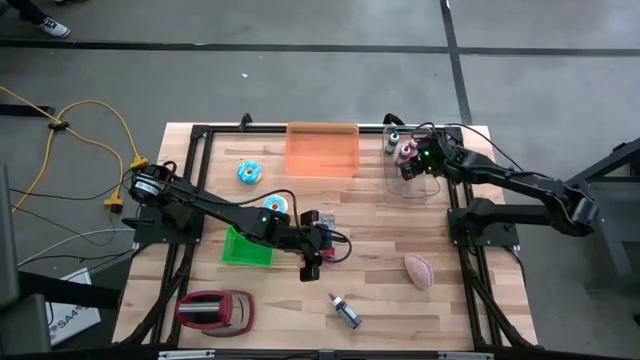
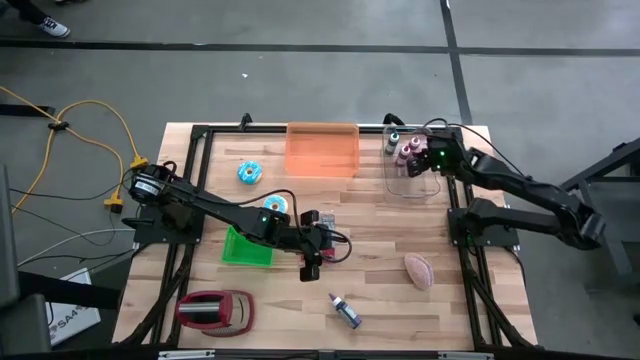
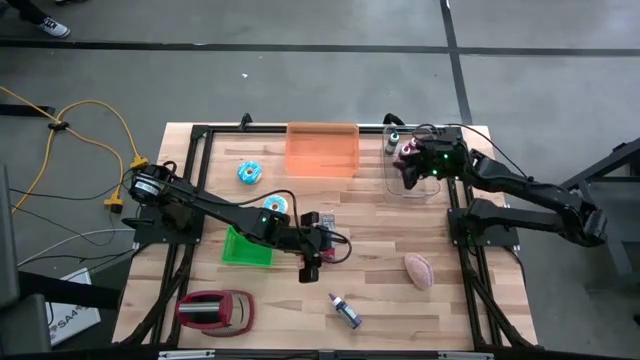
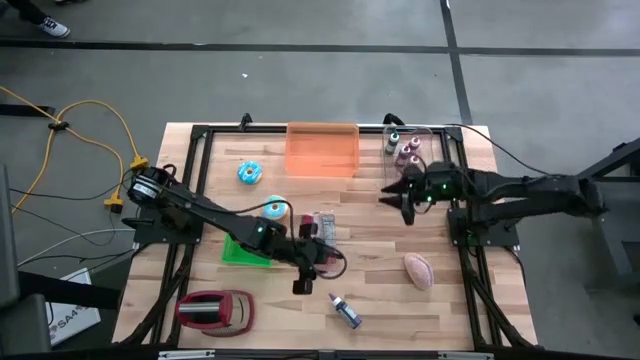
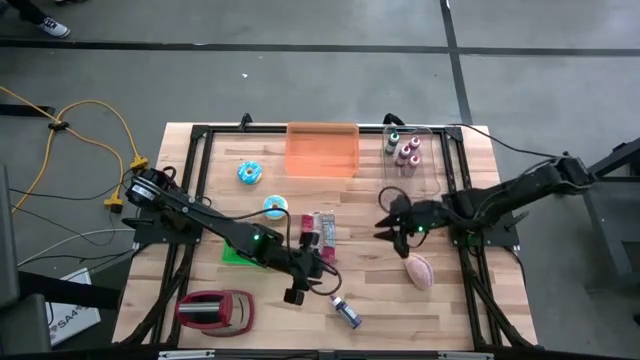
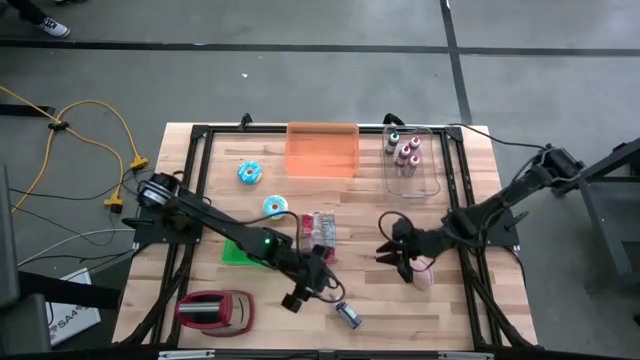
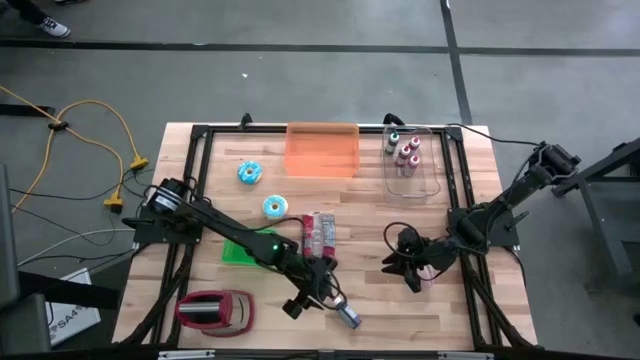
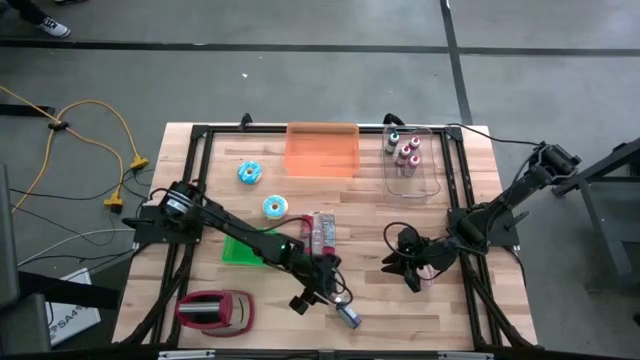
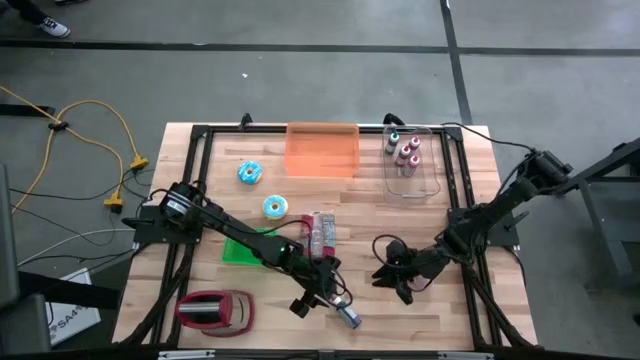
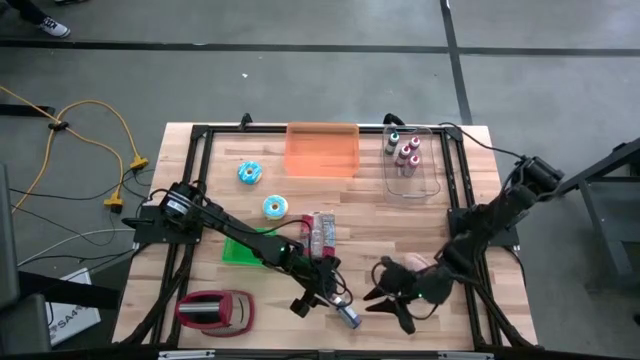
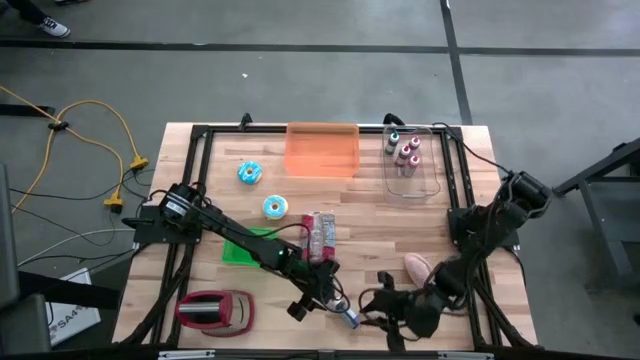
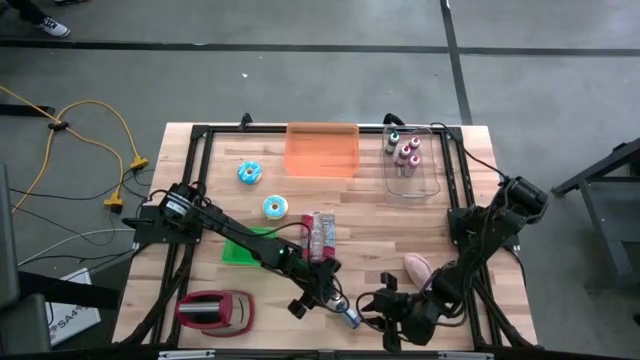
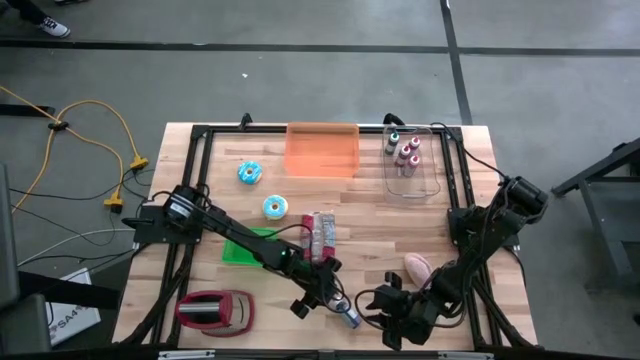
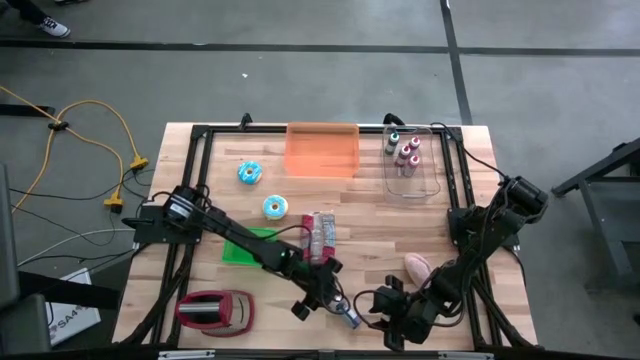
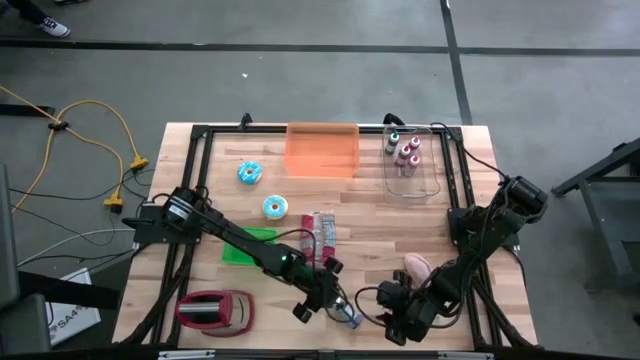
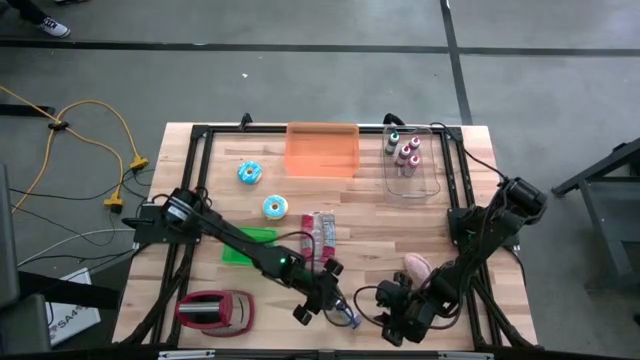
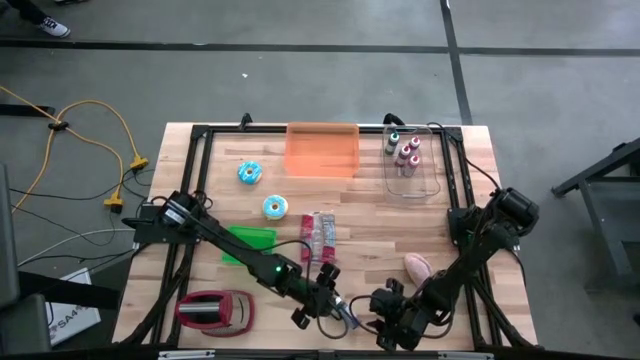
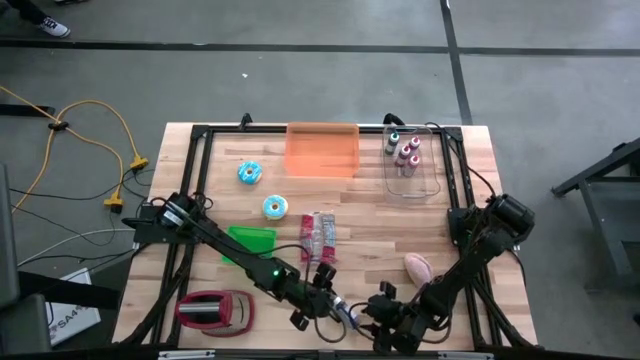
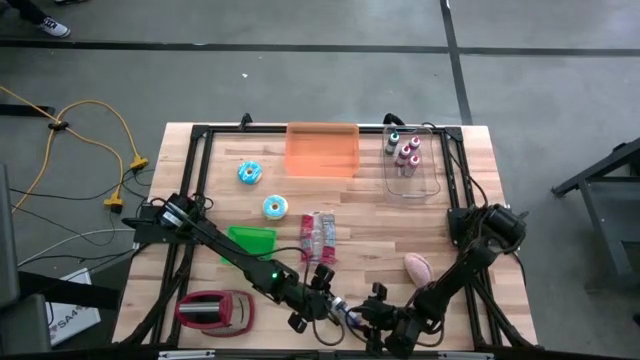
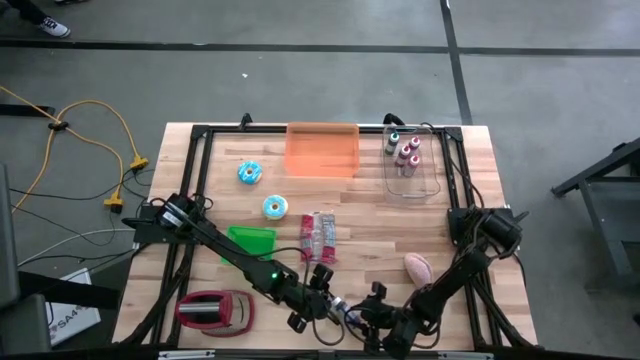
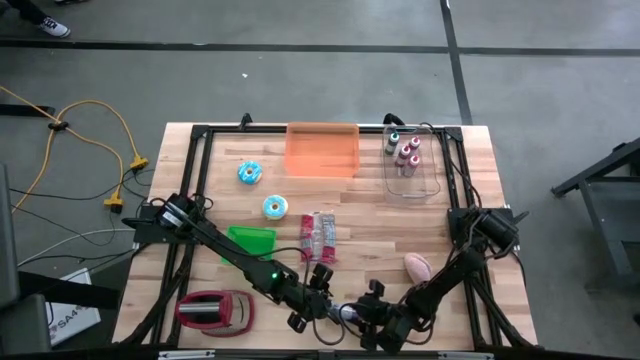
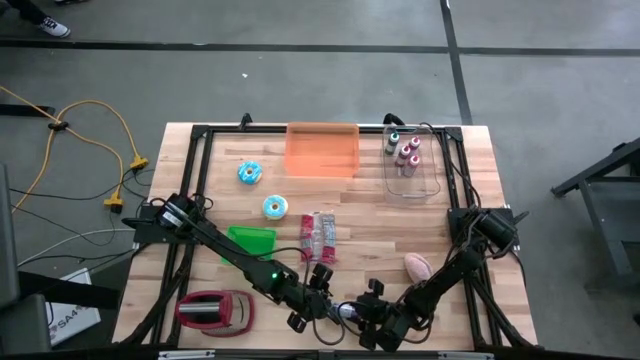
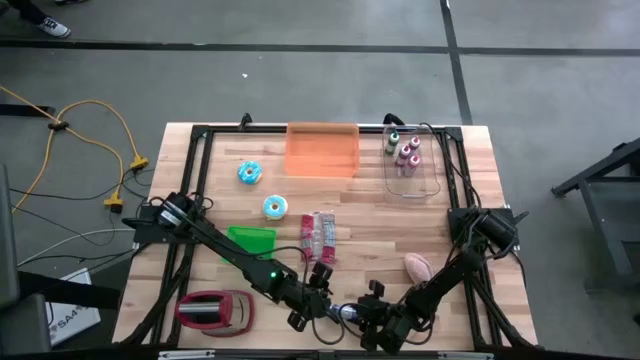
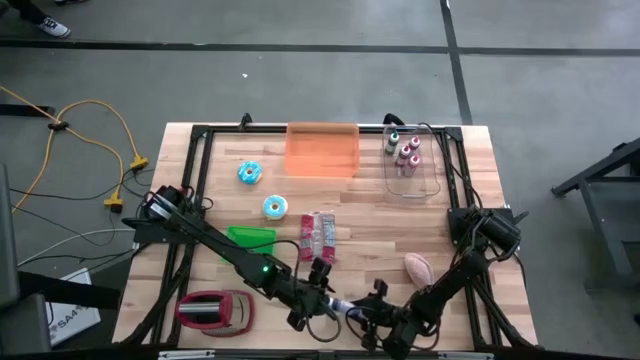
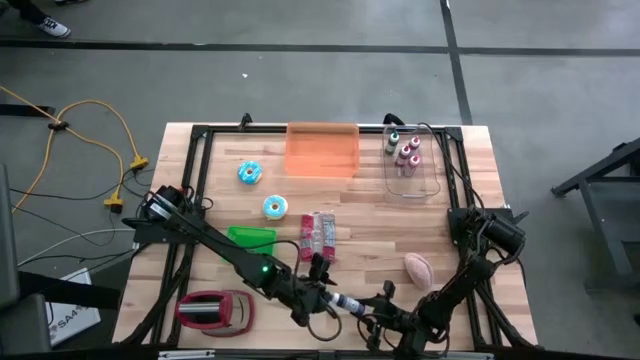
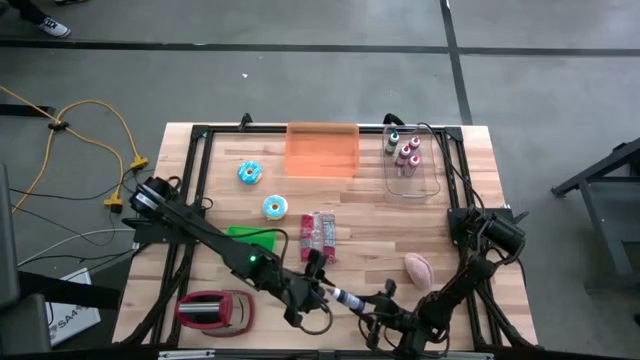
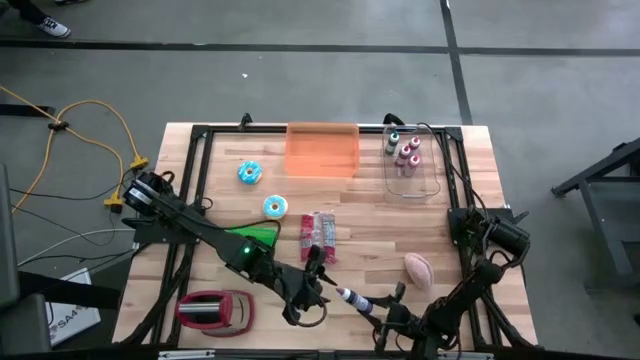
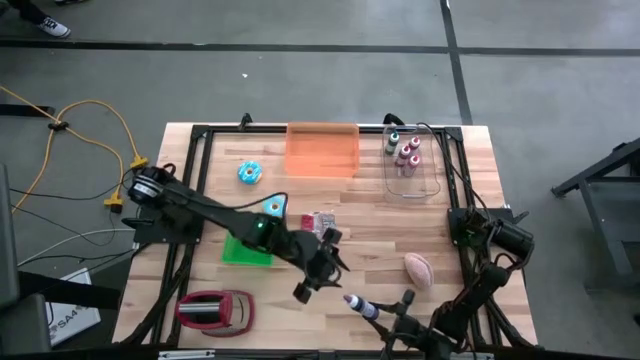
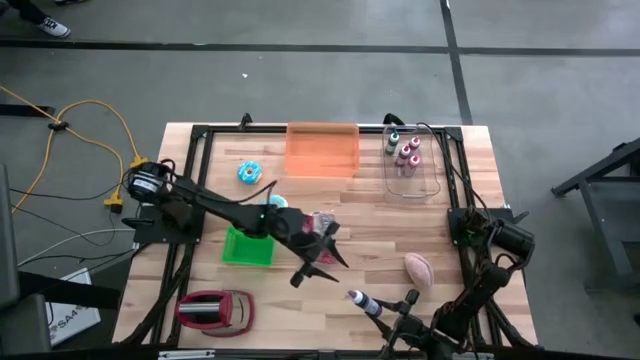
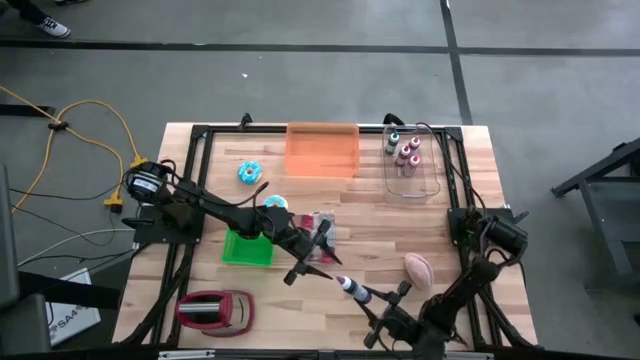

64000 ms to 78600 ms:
Put the violet food coloring bottle into the transparent bin
